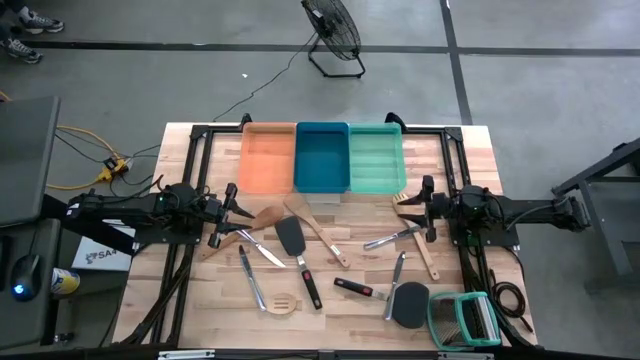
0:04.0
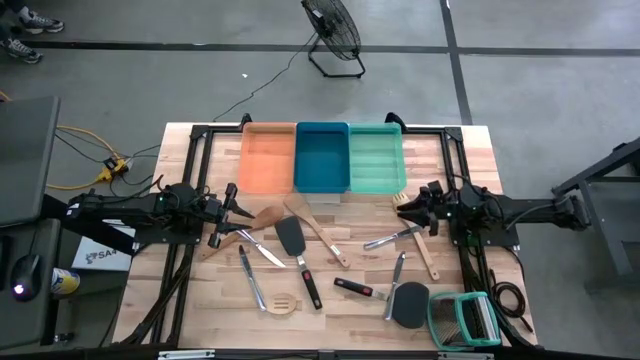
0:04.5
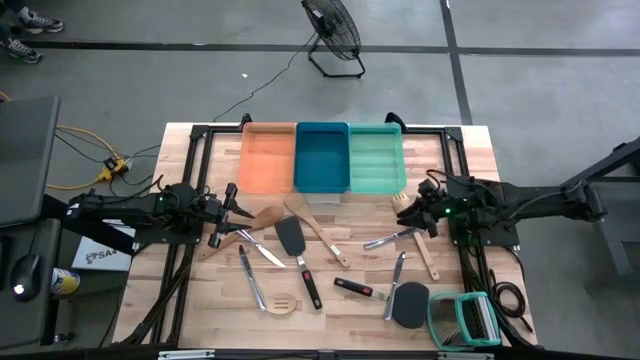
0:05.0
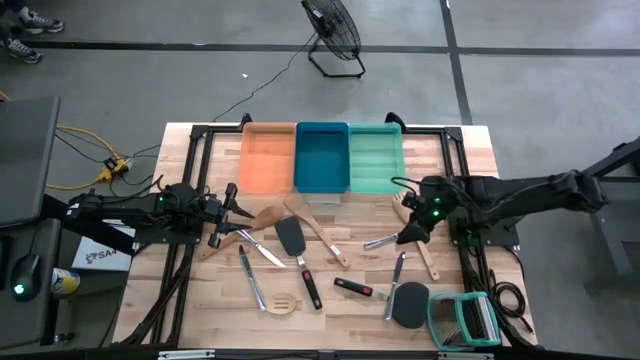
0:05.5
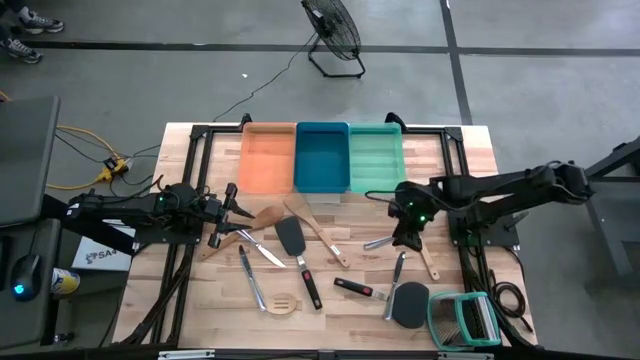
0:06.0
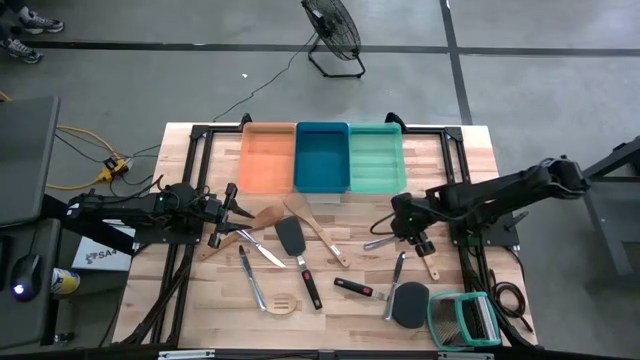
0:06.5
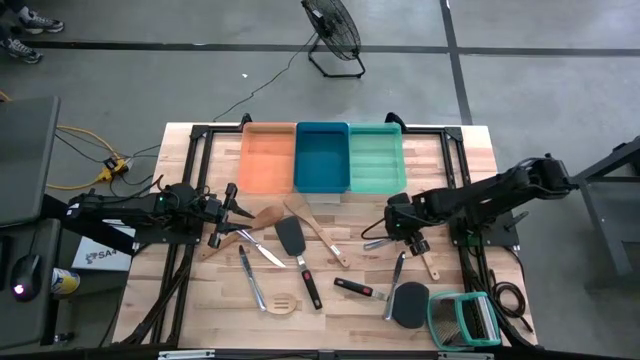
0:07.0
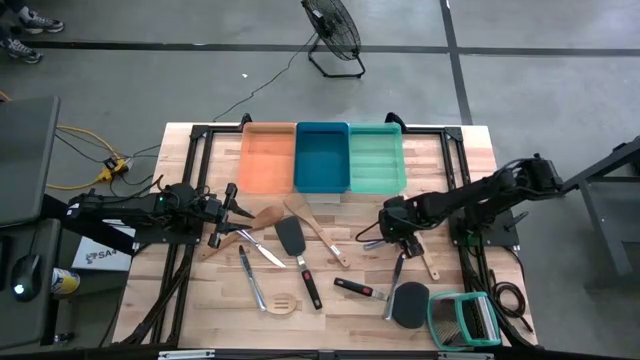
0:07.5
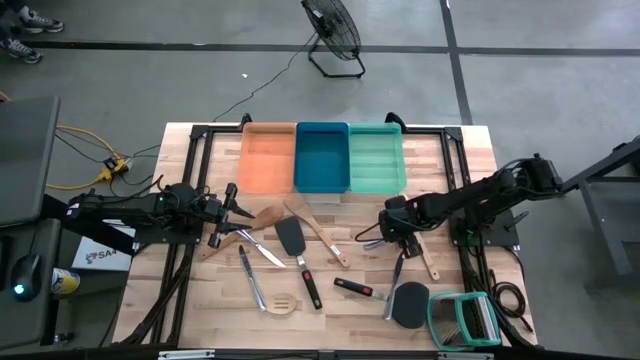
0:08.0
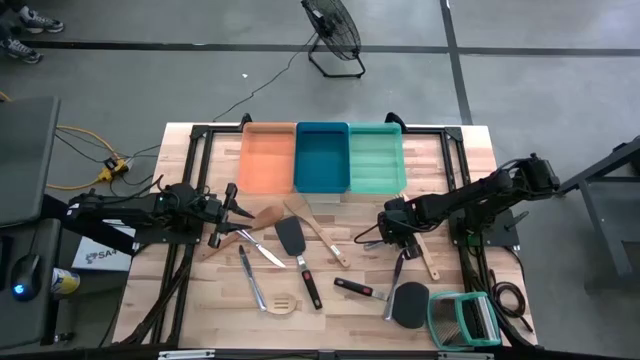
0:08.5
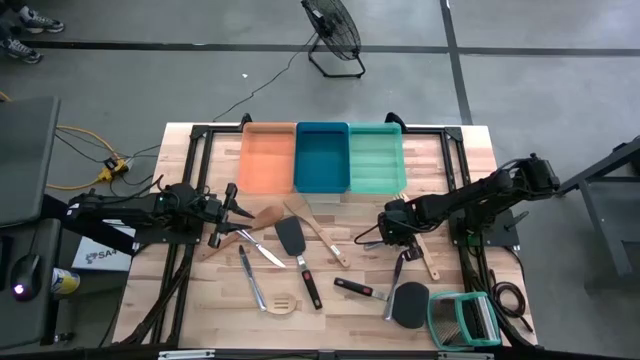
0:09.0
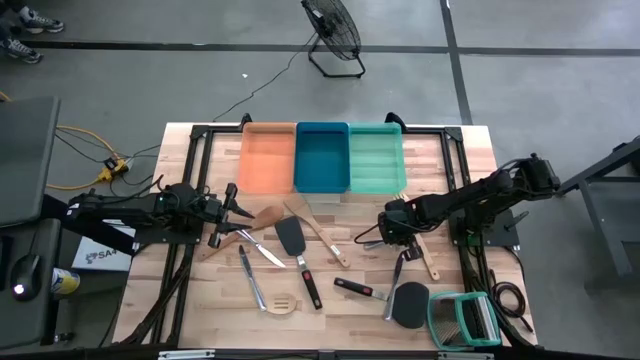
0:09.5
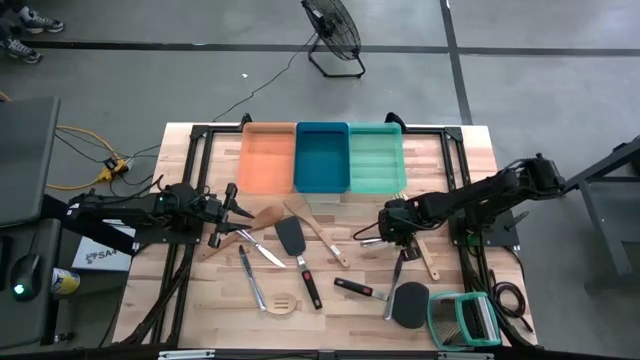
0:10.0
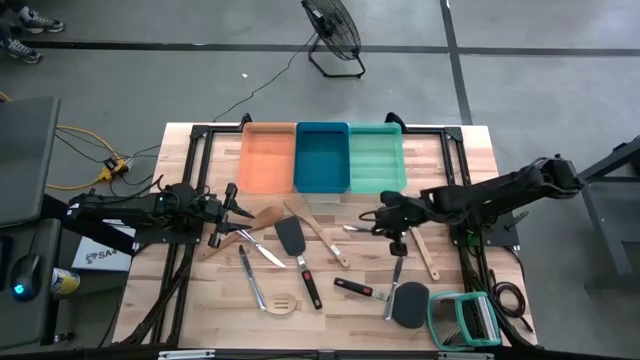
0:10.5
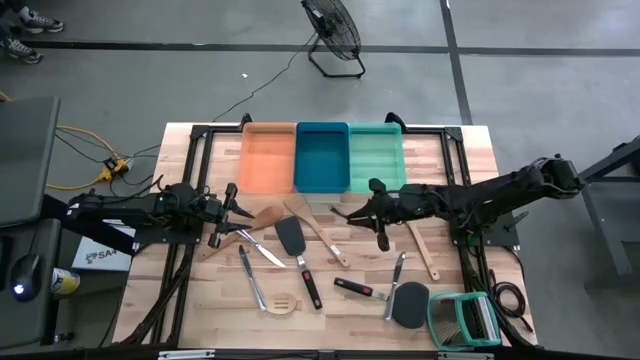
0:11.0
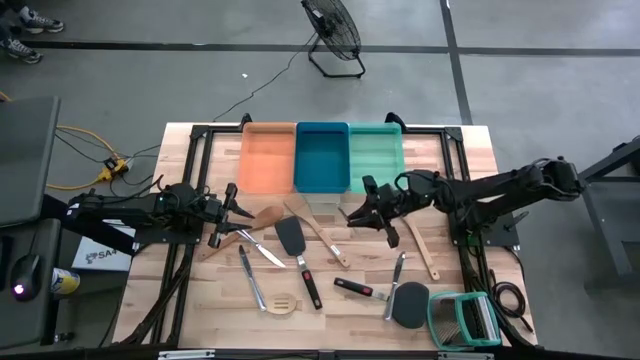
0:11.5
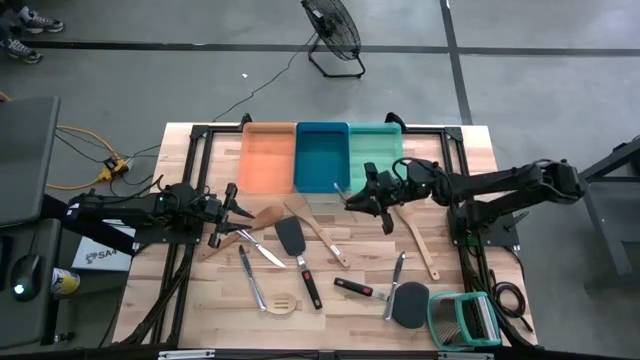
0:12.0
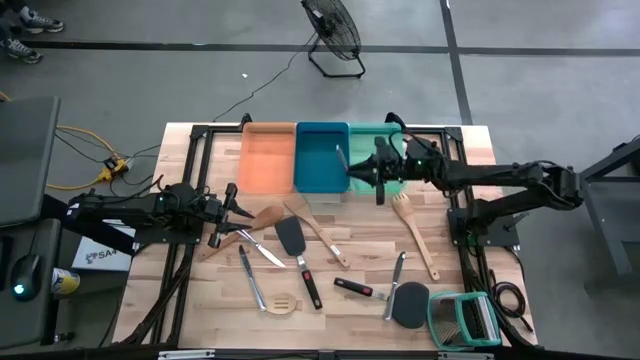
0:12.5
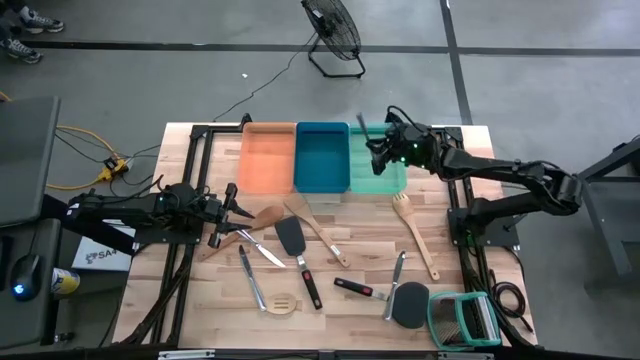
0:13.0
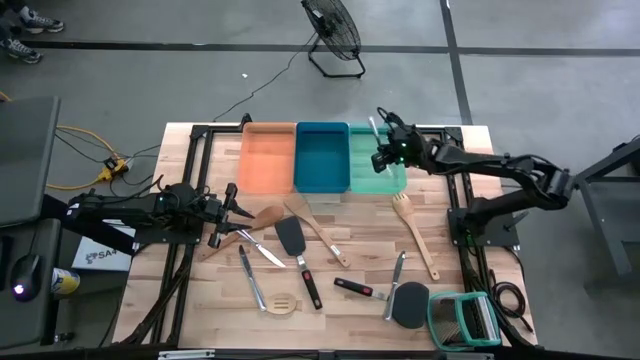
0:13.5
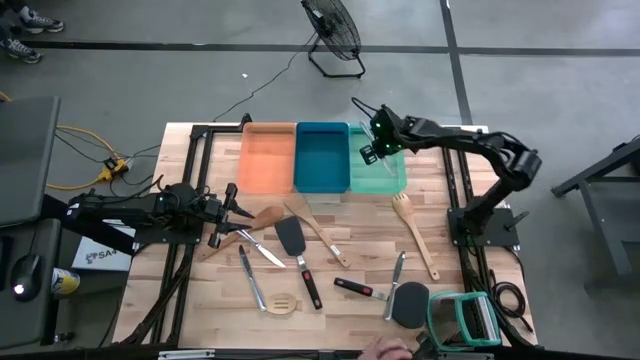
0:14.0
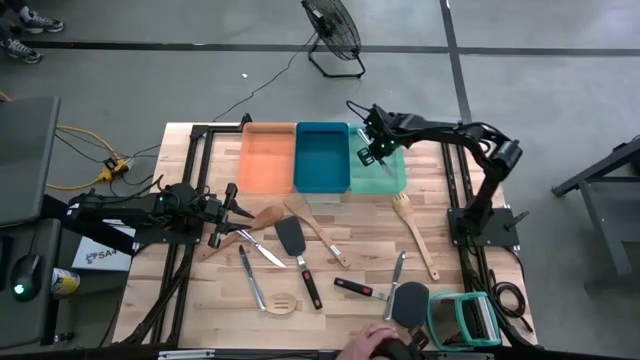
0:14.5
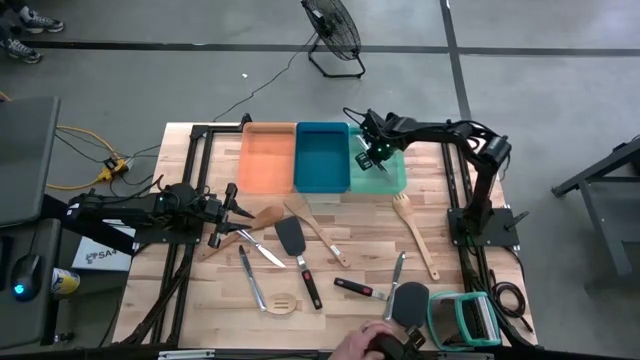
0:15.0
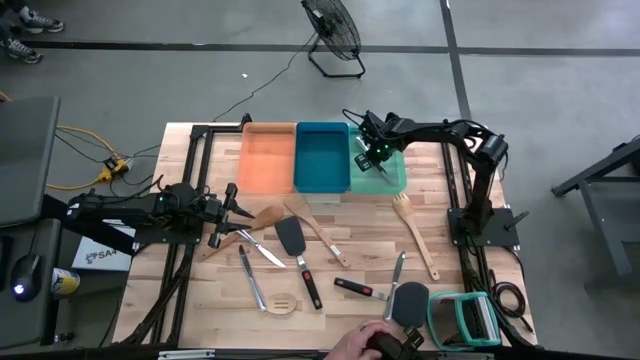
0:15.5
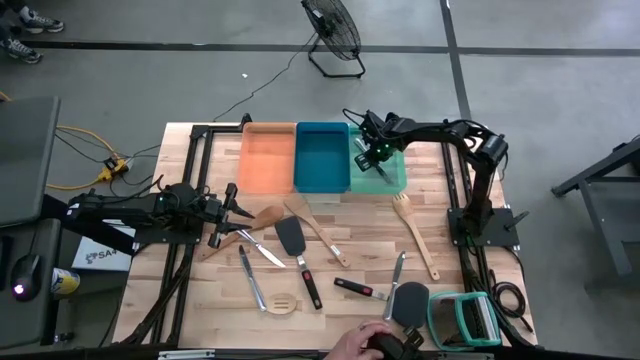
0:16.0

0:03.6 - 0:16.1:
Task: Pick & Place Kitchen Items
Put the silver knife into the green bin

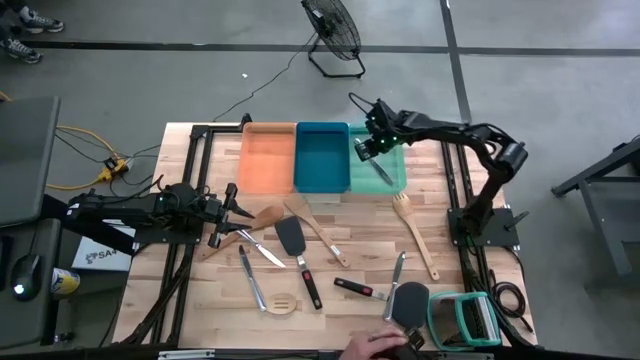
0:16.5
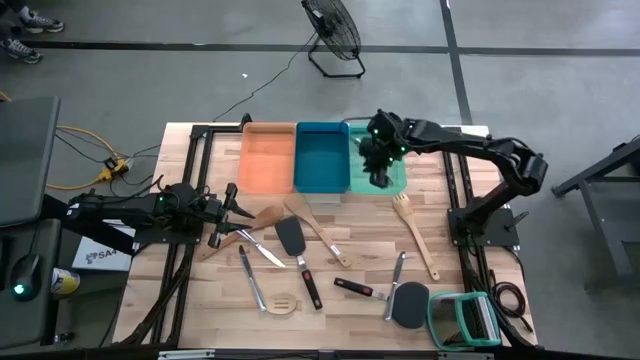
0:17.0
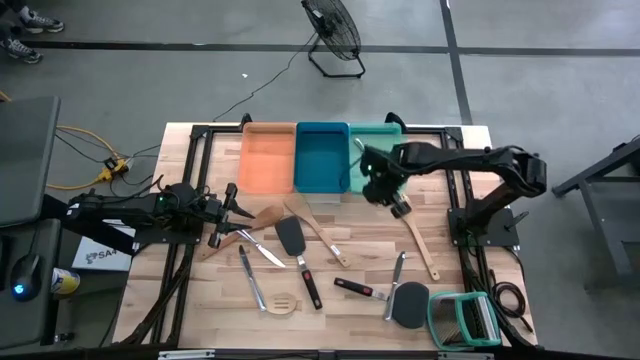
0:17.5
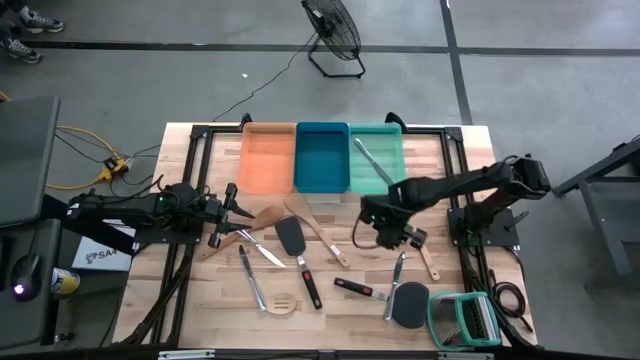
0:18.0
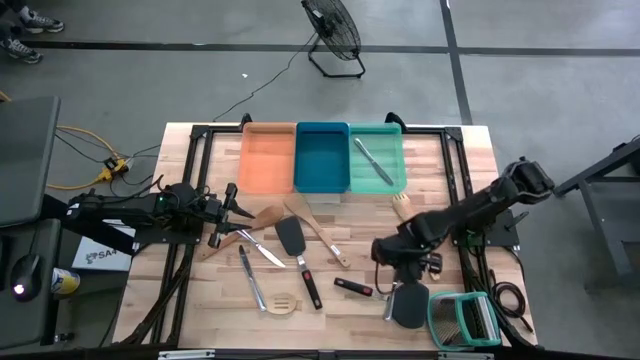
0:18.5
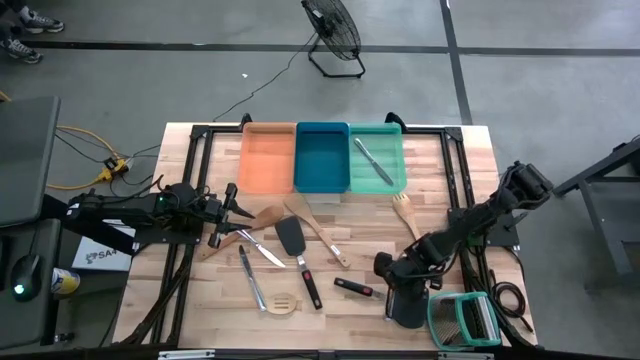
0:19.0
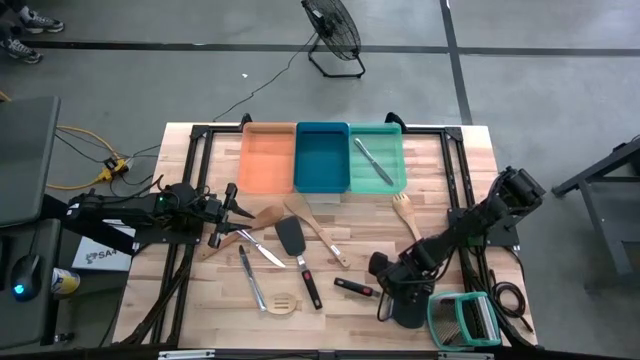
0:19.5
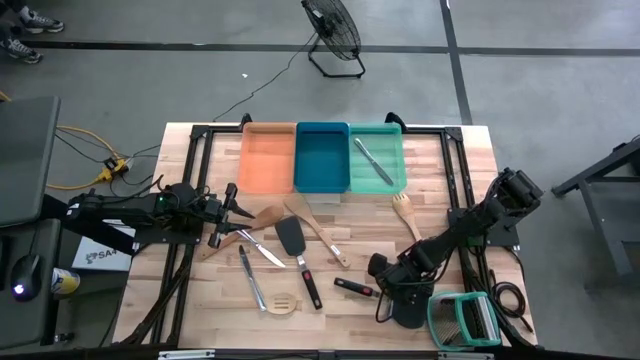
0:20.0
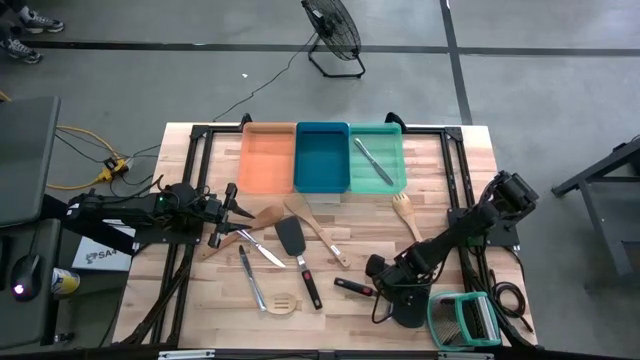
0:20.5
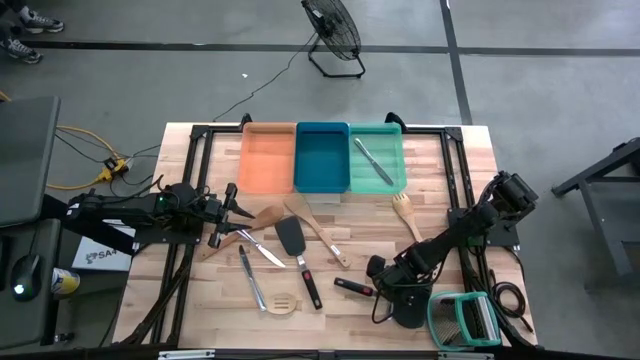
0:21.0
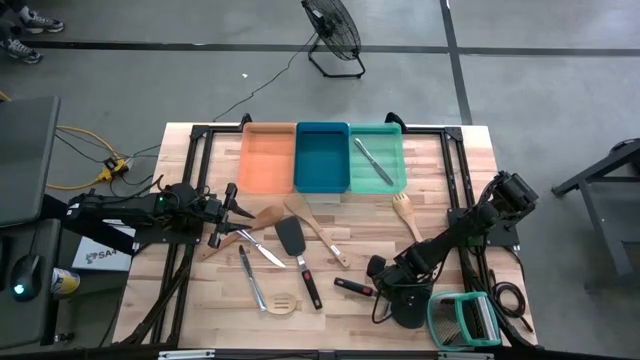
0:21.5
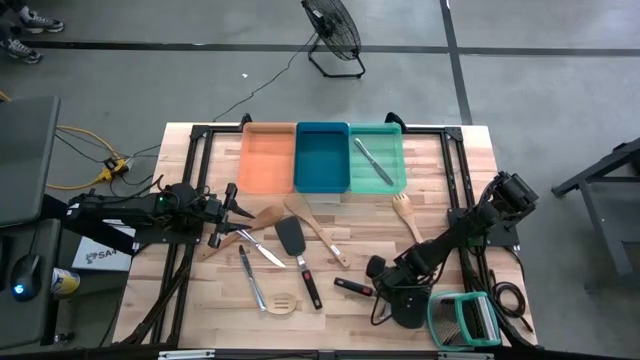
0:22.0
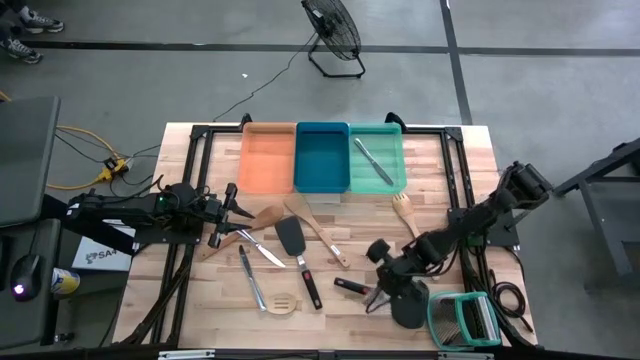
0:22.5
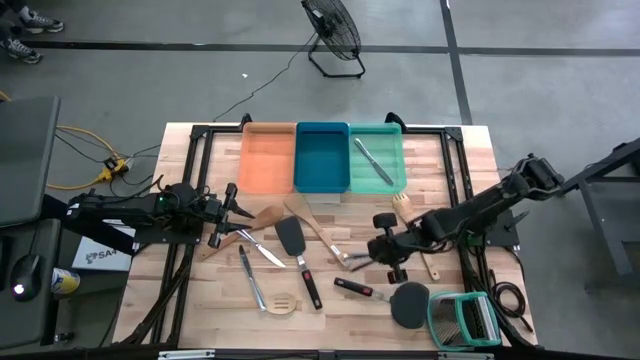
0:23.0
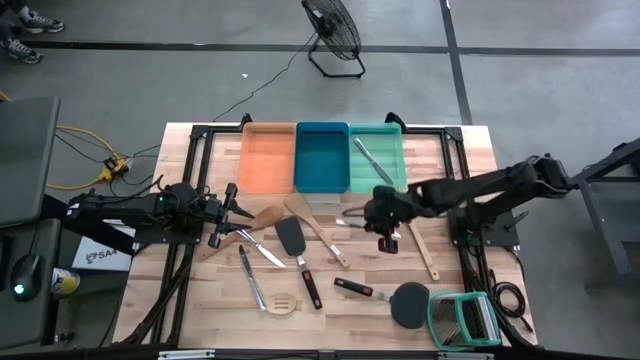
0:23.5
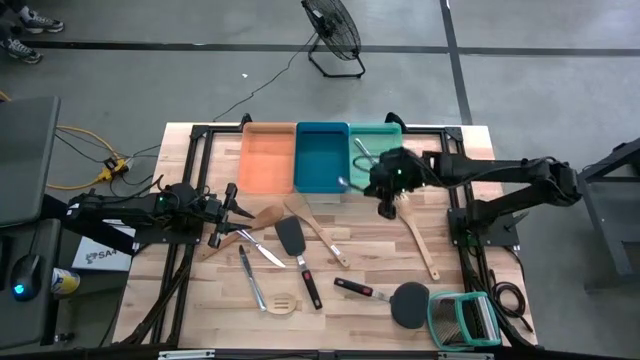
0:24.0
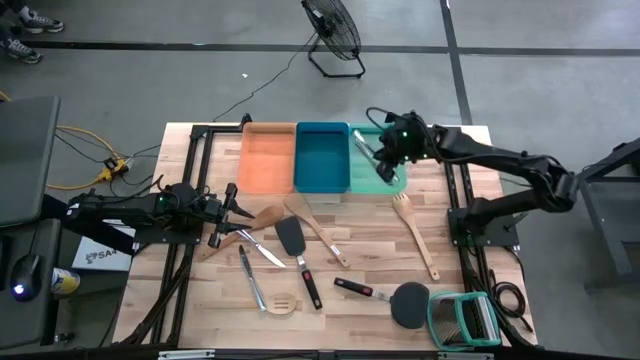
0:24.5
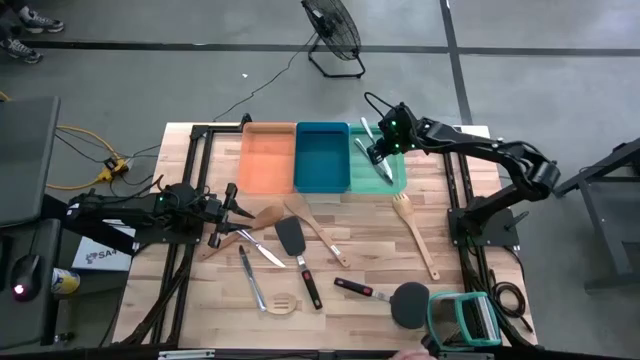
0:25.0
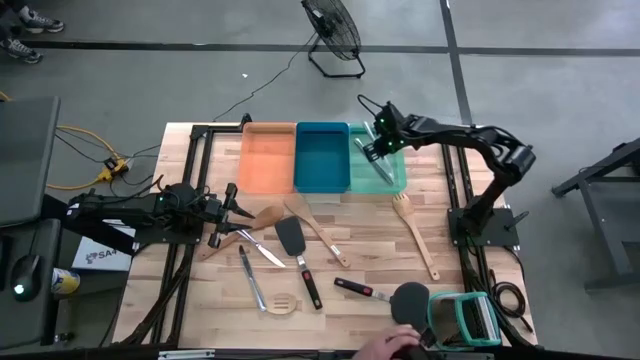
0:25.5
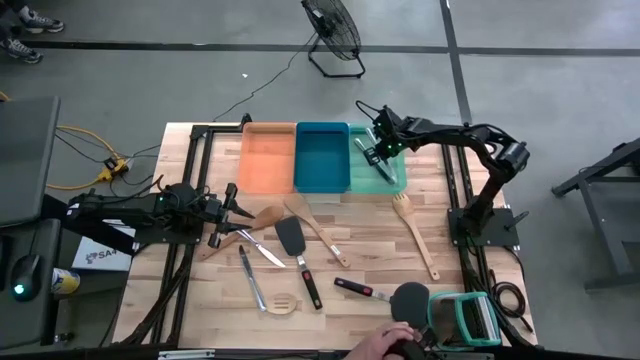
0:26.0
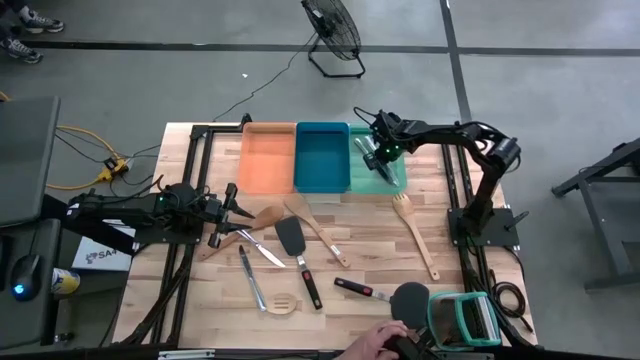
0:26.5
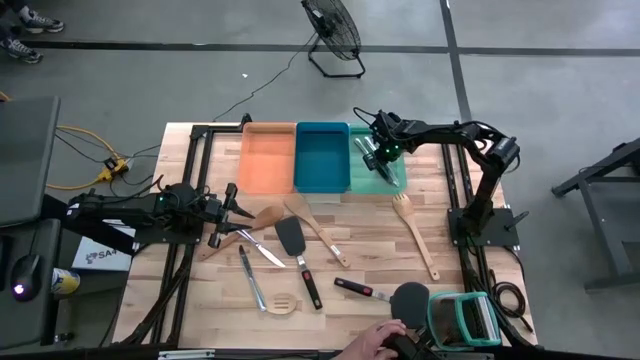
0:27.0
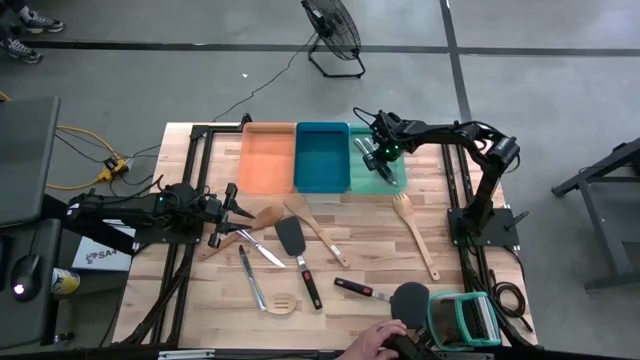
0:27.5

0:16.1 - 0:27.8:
Put the silver knife into the green bin
